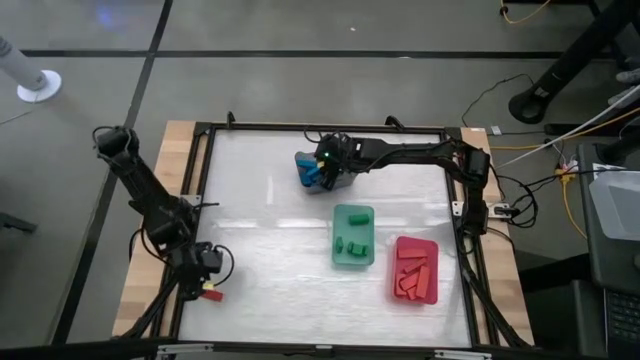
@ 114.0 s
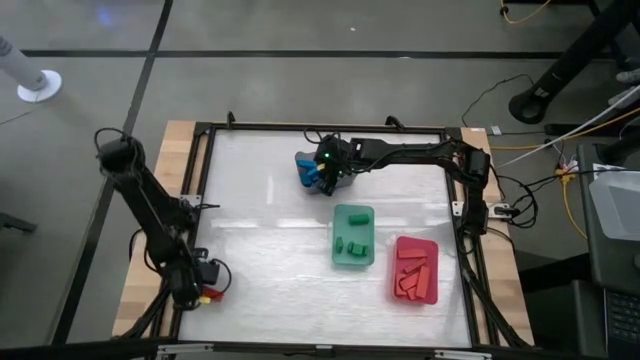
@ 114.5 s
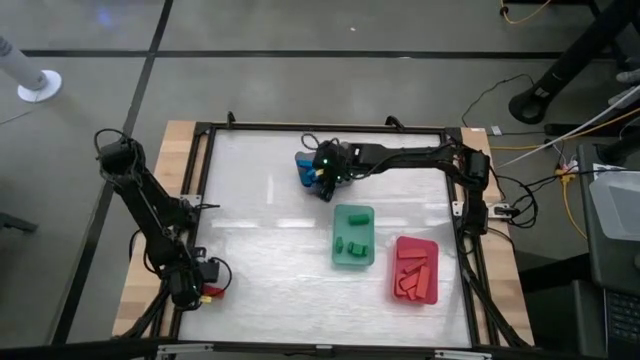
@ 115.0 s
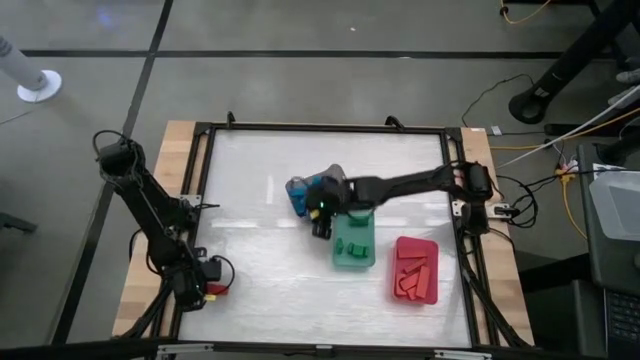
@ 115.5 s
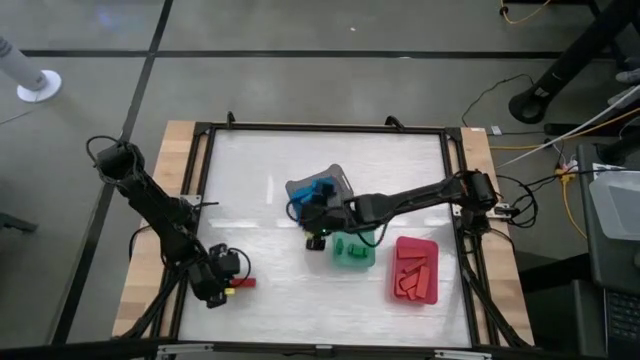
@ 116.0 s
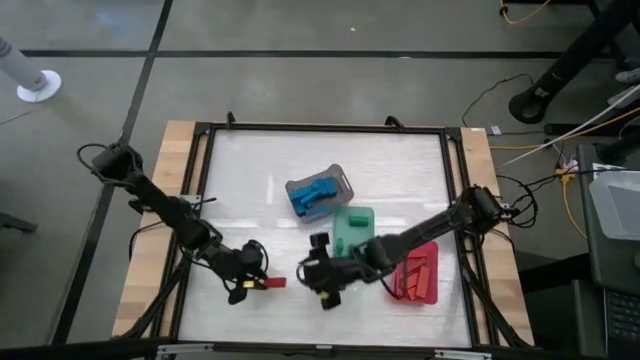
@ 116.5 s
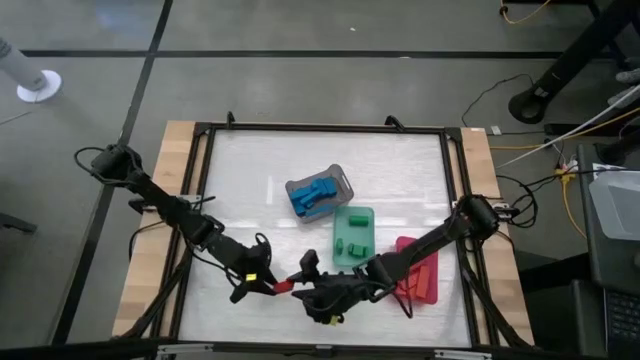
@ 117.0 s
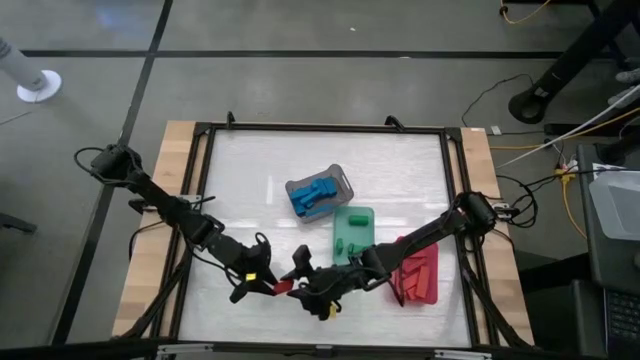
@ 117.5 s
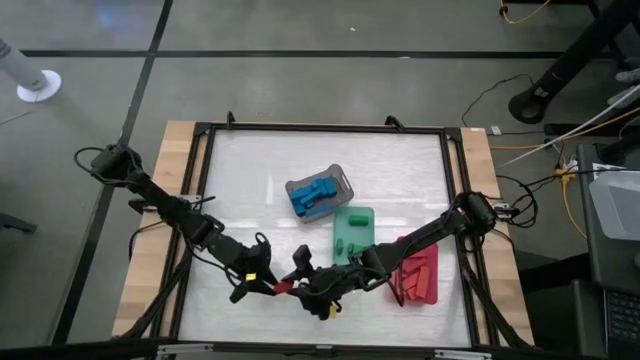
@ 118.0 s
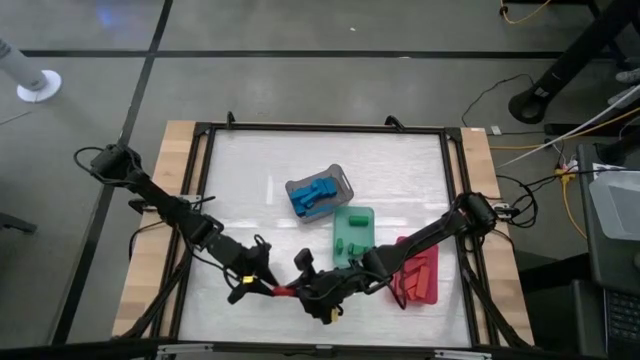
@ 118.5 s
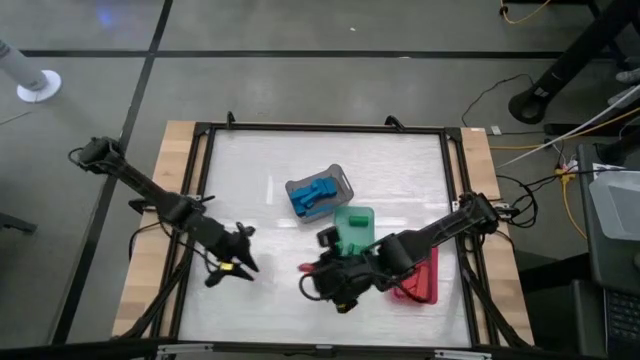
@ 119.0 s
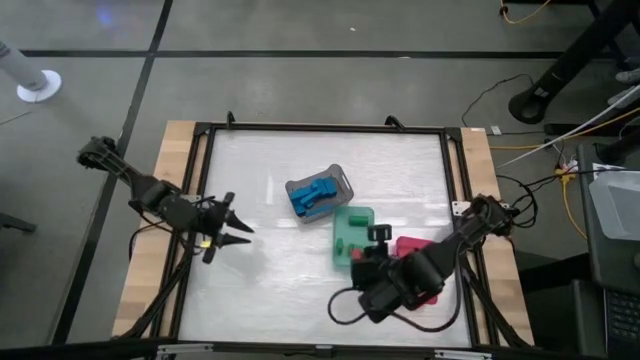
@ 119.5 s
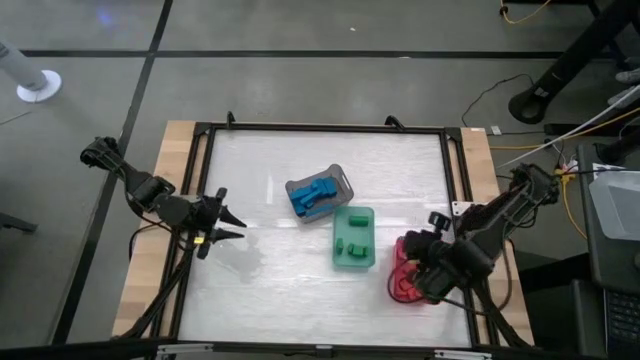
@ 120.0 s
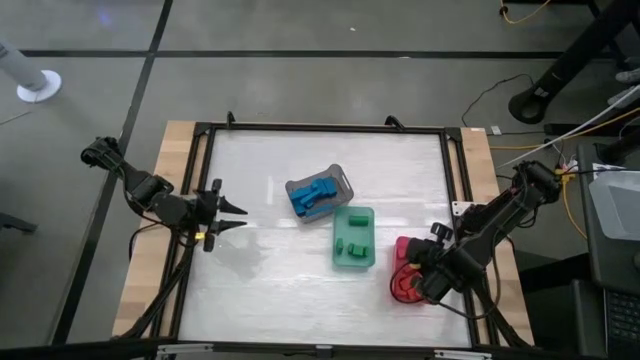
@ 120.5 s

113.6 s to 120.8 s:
Task: Sort blocks
Put the red block into the pink bin

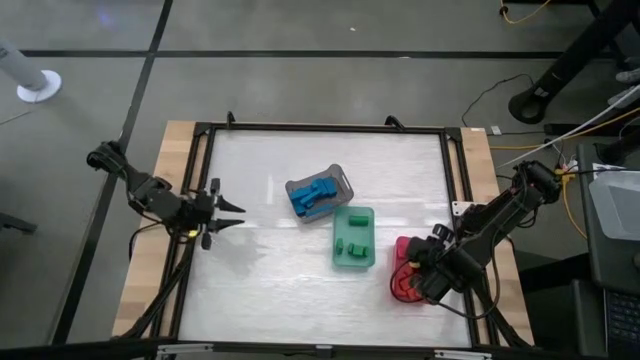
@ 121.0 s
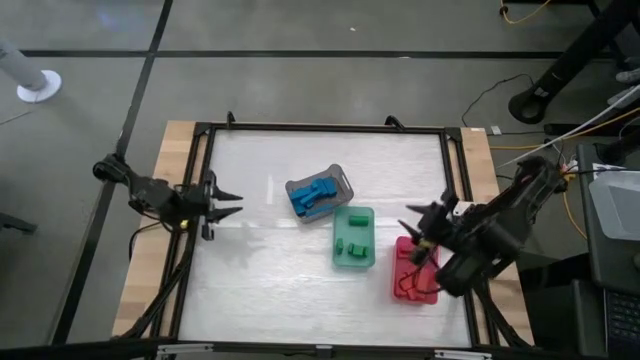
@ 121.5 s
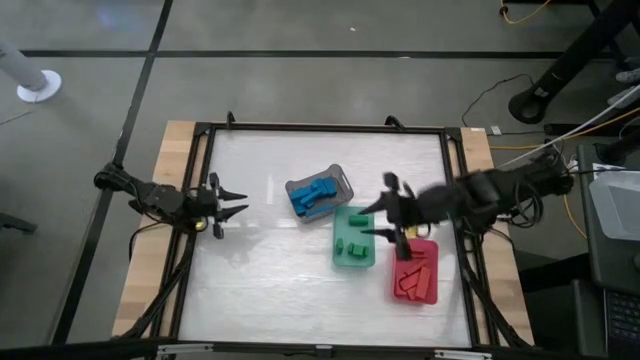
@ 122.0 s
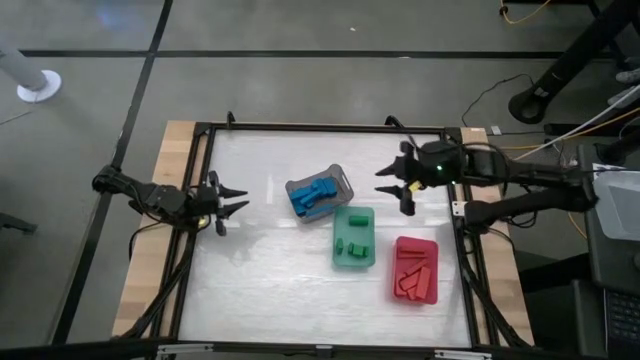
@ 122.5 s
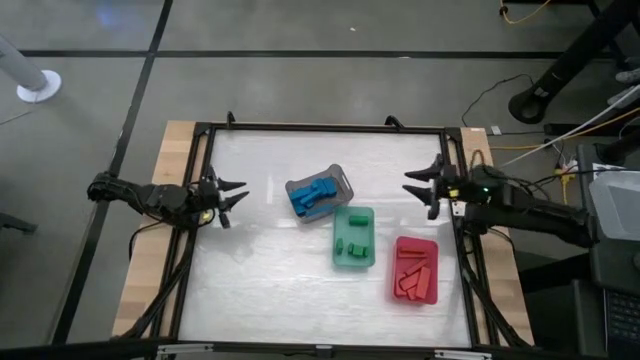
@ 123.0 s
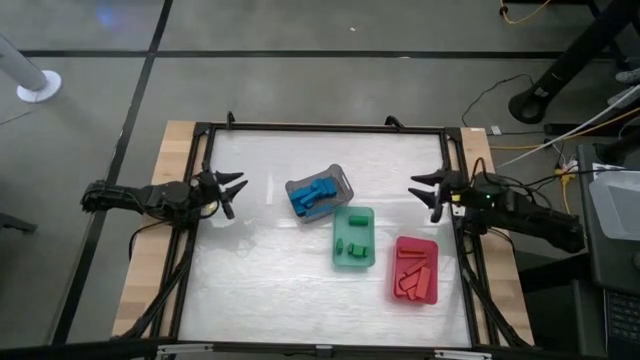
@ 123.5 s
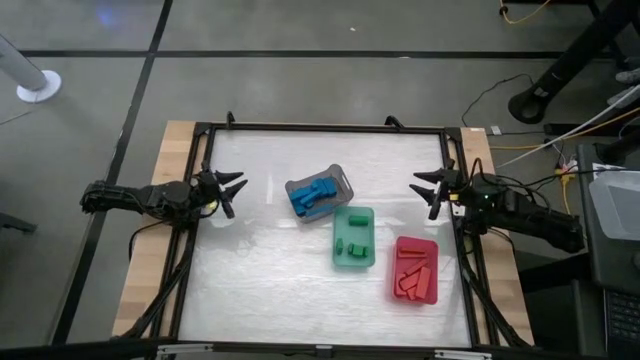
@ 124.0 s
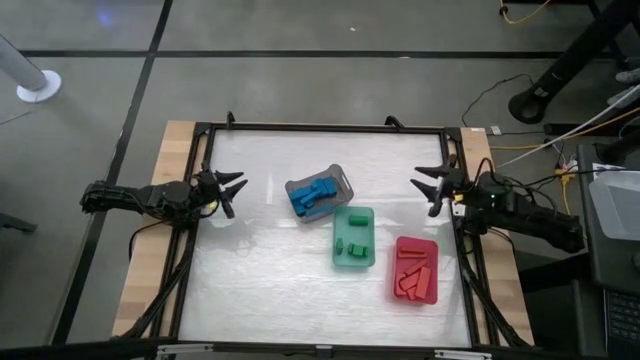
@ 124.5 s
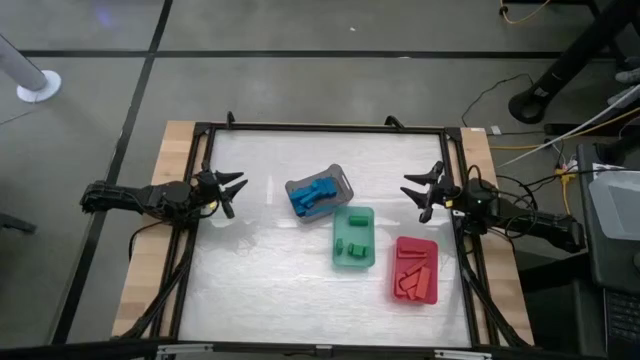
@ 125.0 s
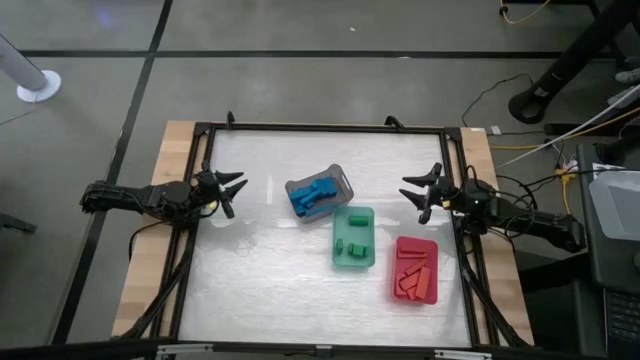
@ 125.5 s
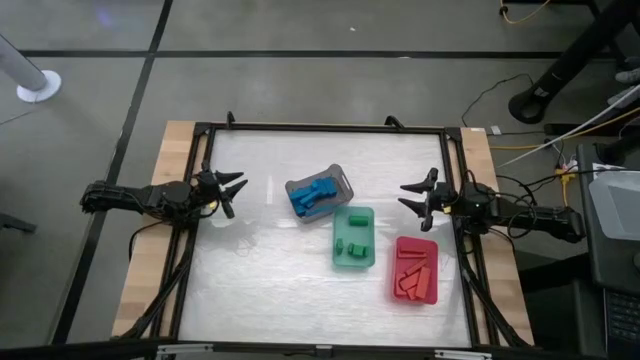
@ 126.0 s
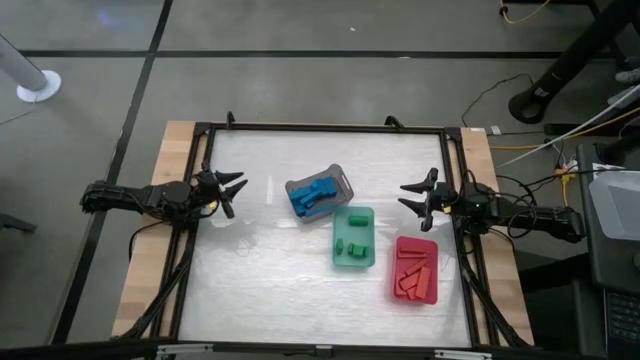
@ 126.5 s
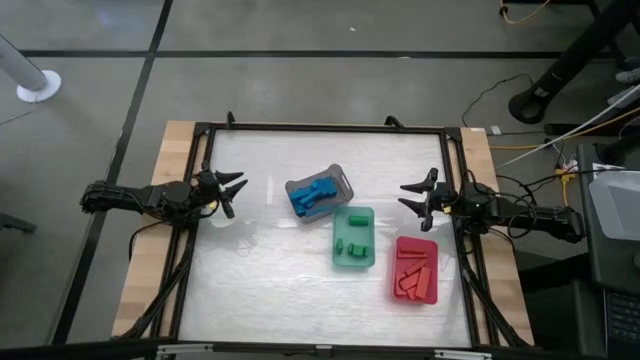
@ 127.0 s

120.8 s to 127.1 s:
Return to Home Position

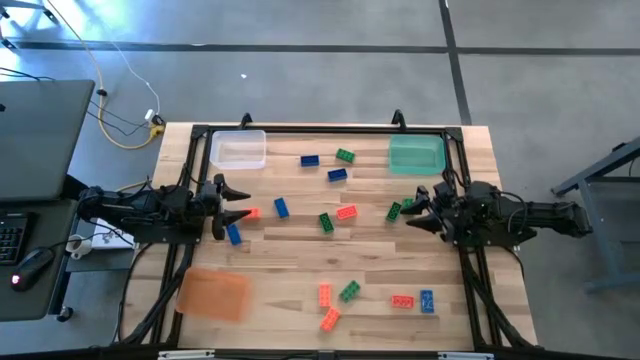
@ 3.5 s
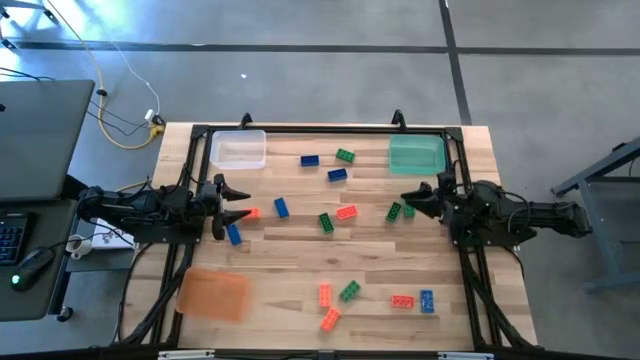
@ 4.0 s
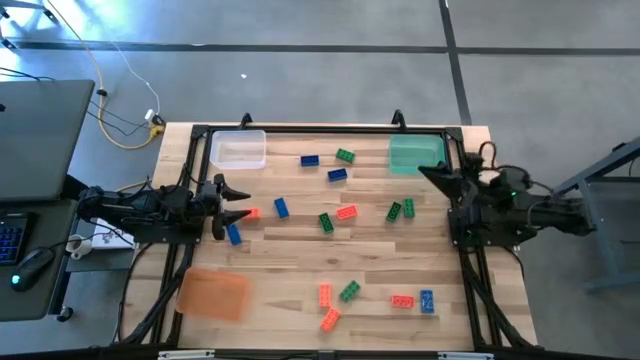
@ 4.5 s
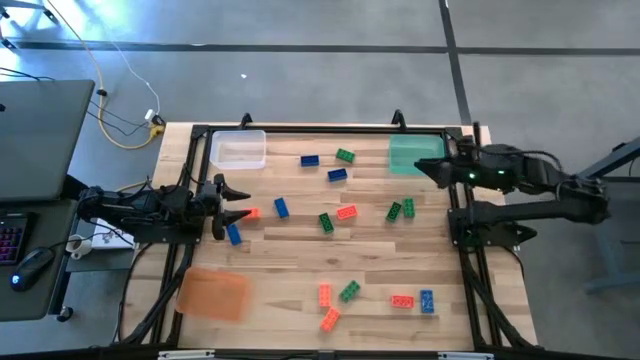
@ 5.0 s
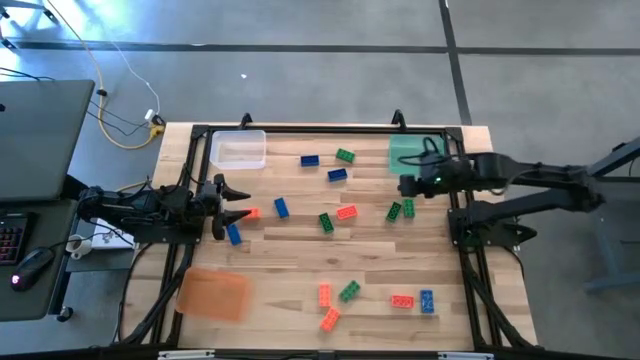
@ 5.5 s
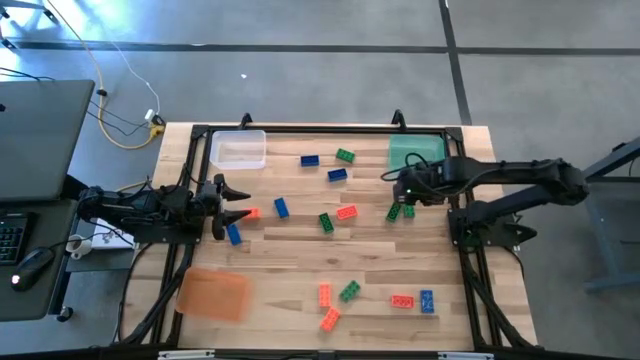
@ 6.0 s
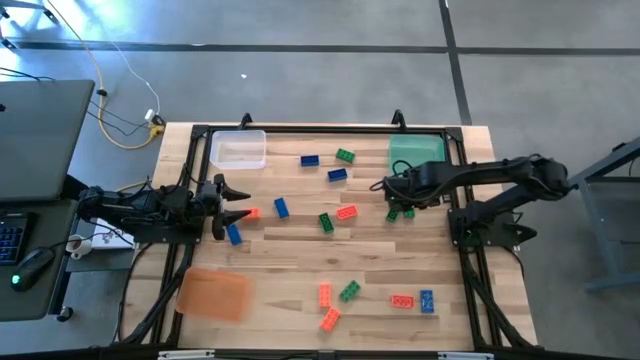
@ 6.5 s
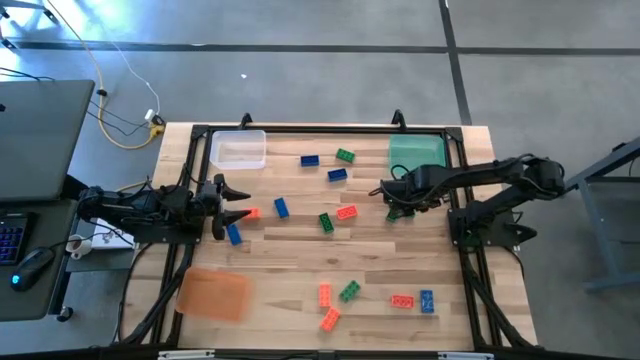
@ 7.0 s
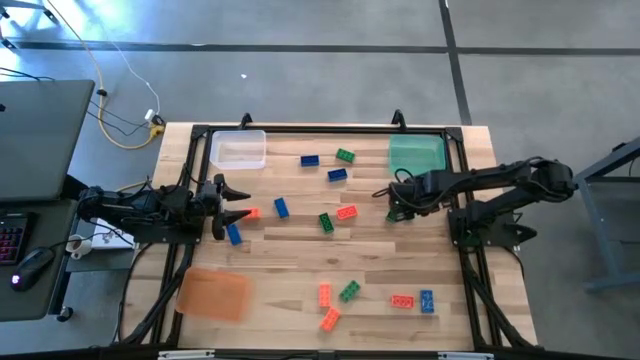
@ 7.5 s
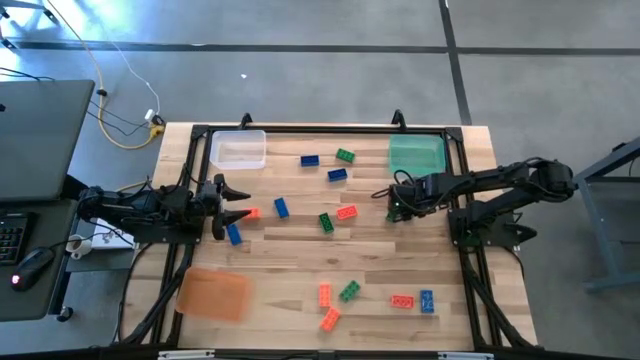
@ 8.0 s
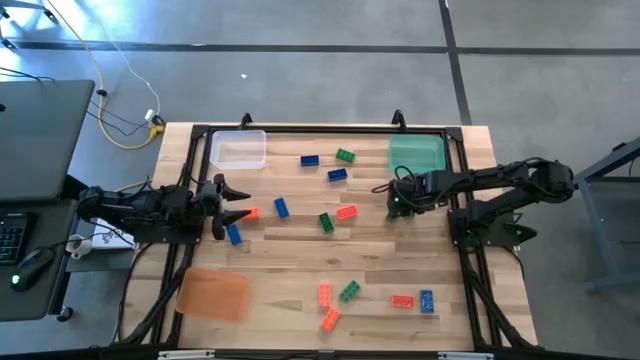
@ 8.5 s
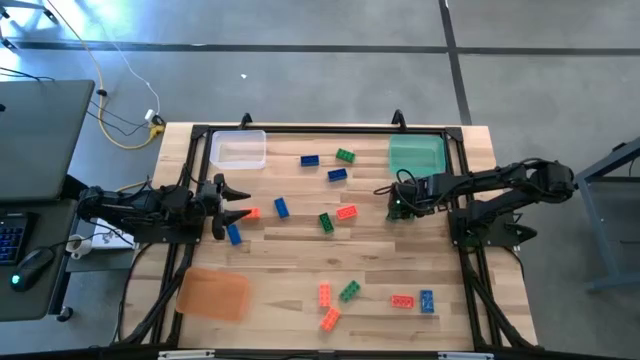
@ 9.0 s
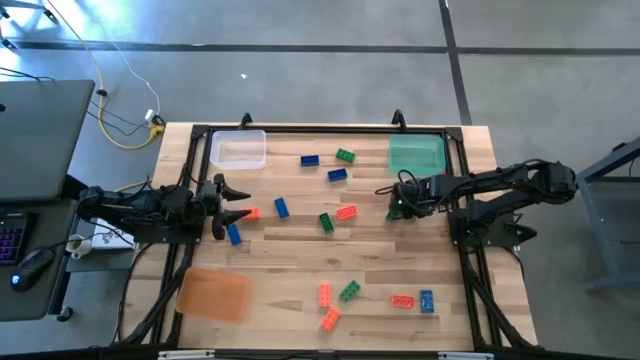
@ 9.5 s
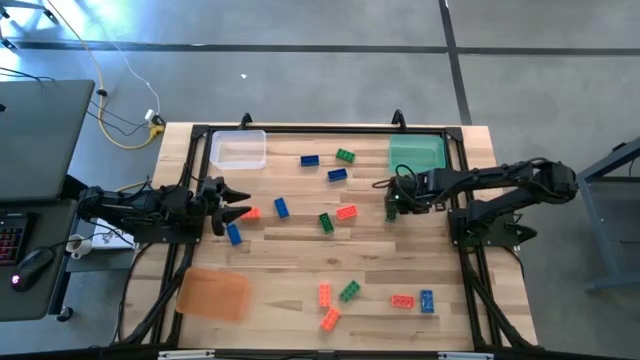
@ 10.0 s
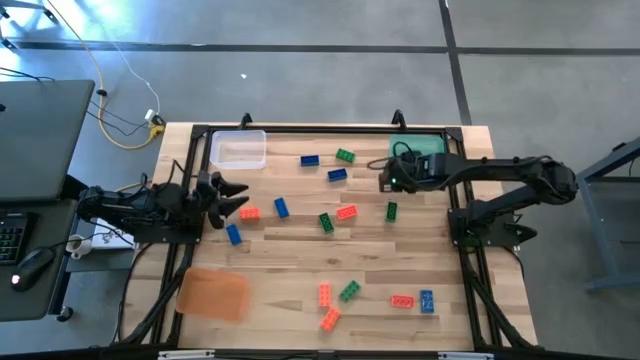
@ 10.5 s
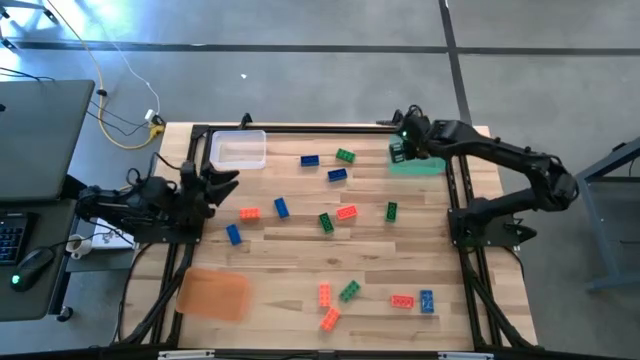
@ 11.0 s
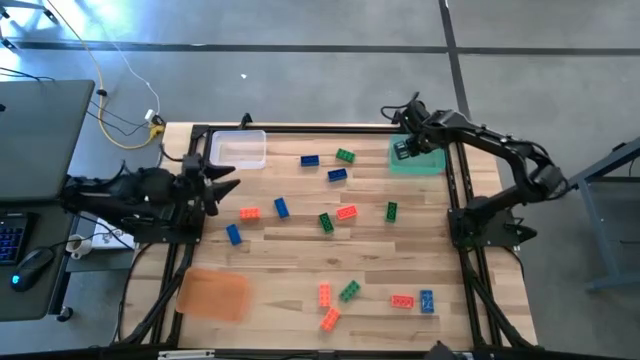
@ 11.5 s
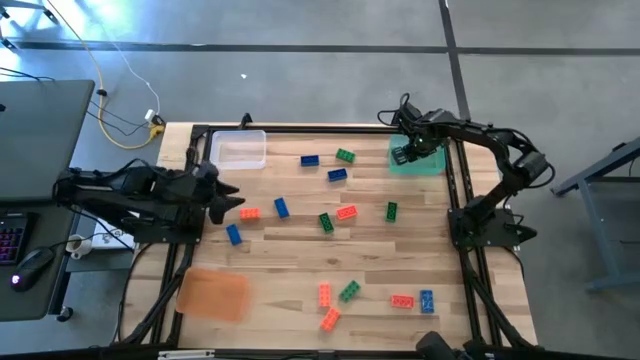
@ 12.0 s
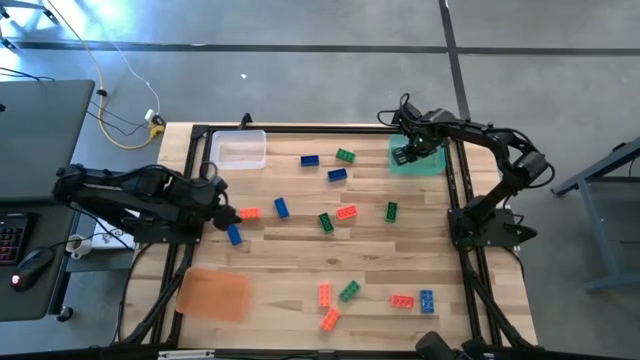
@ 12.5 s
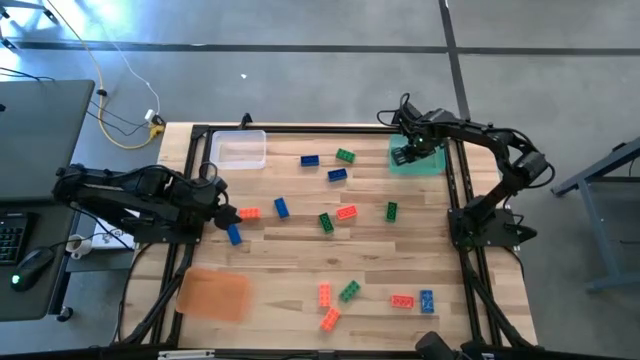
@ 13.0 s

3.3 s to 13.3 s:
Task: Sort & place blocks by color
Put the green game piece into the green bin
